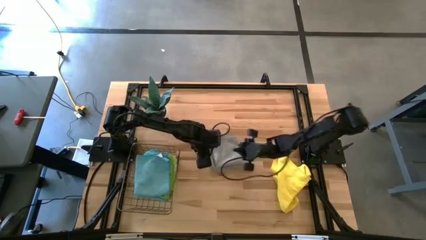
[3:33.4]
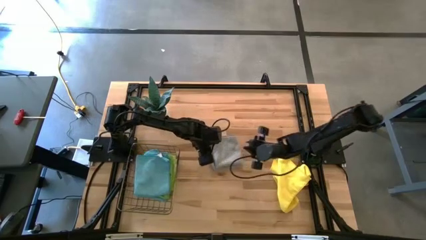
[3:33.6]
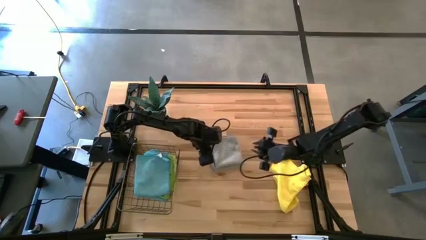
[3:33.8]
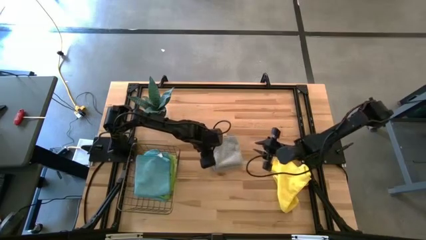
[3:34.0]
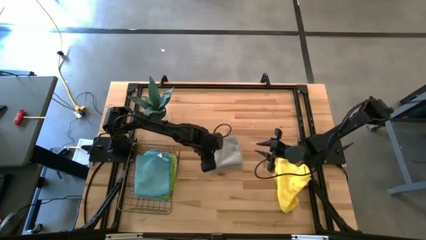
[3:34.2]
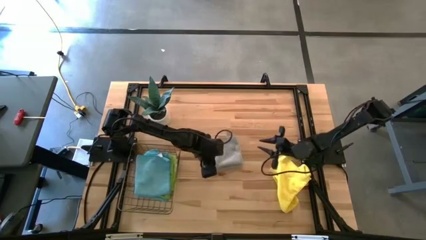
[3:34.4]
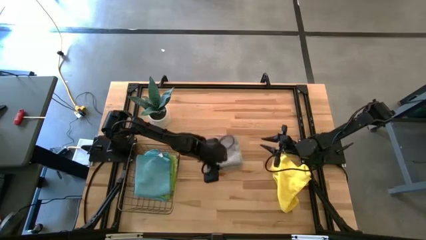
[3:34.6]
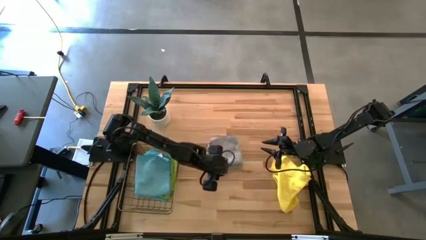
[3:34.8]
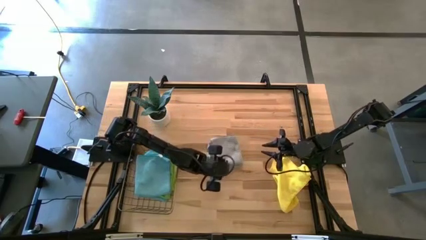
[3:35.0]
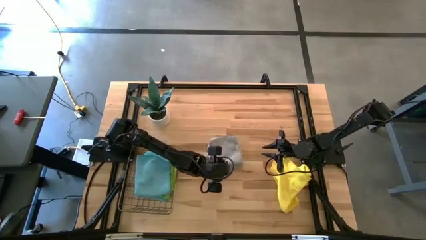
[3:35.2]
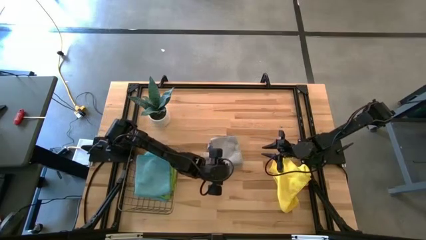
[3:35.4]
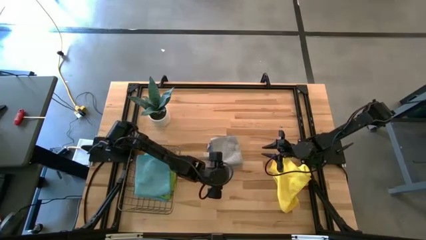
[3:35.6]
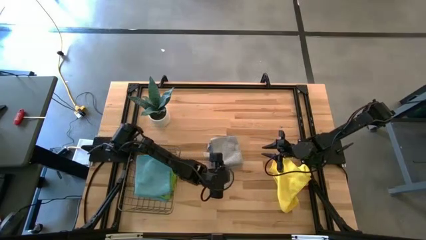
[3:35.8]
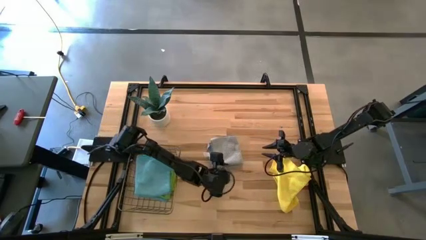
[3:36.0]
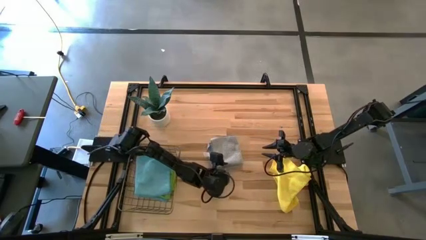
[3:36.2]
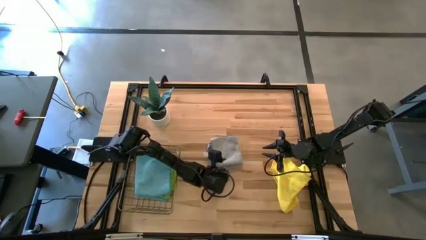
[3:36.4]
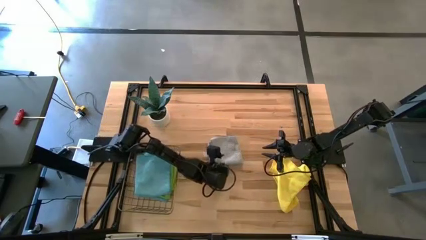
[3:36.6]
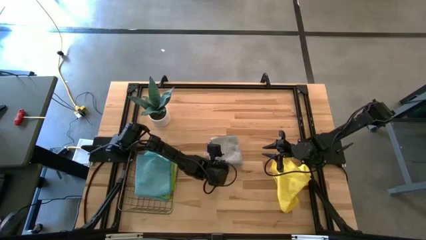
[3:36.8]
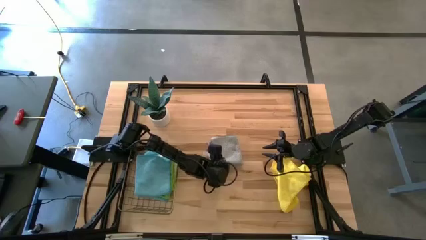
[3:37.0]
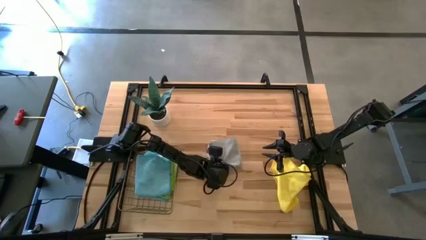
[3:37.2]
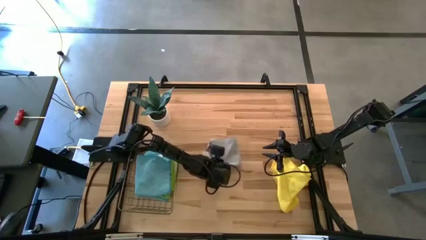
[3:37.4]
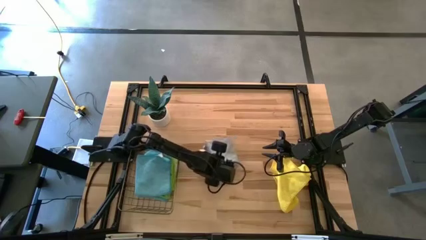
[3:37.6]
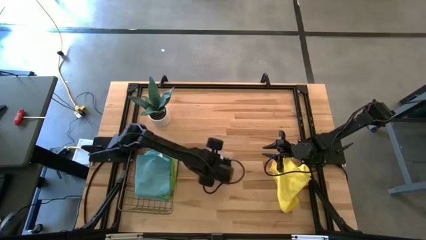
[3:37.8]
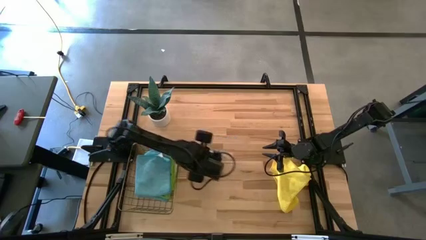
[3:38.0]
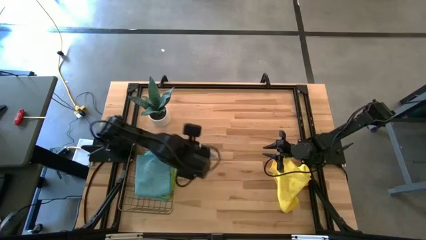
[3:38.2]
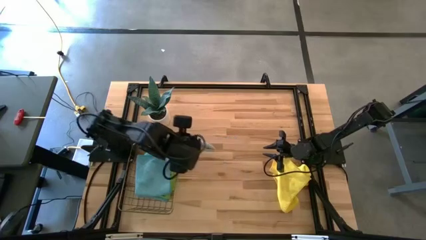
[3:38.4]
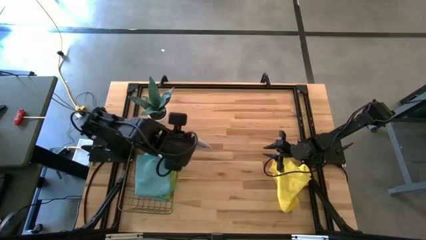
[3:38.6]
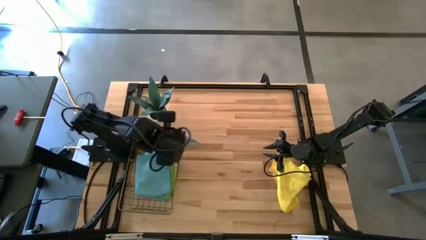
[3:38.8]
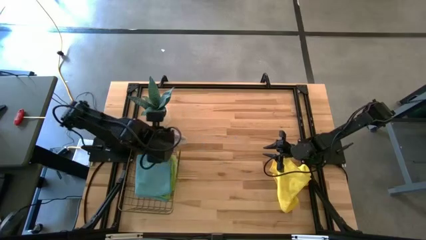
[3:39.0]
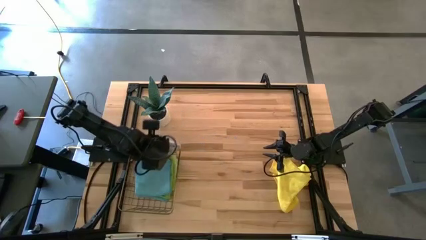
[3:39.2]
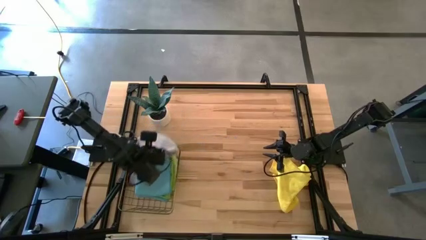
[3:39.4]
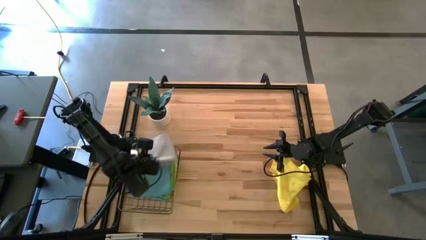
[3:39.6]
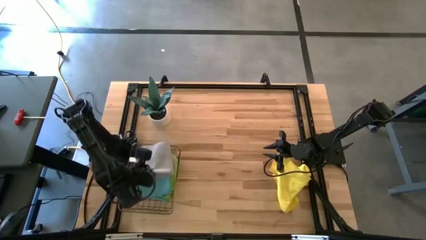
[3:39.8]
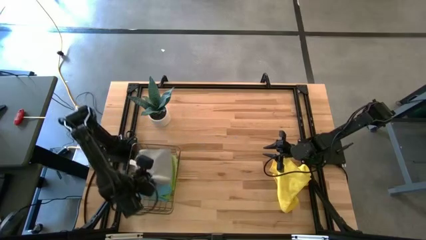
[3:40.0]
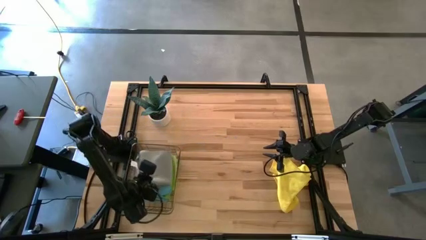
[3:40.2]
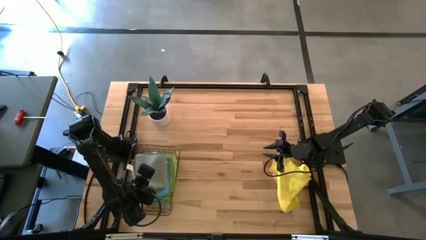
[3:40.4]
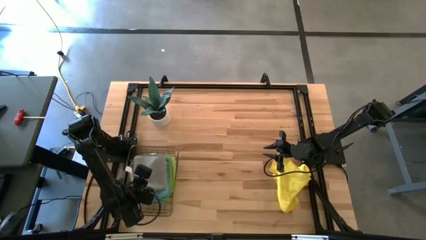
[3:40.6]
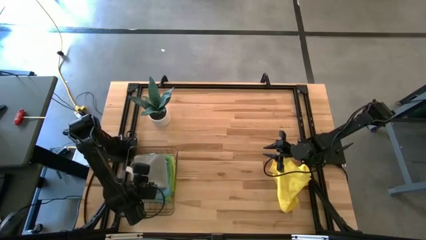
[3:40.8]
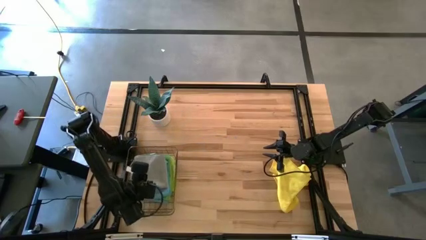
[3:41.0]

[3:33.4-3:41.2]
Task: Fold microfiber towels
Put the gray microfiber towel into the wire basket

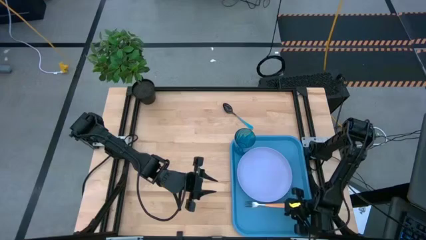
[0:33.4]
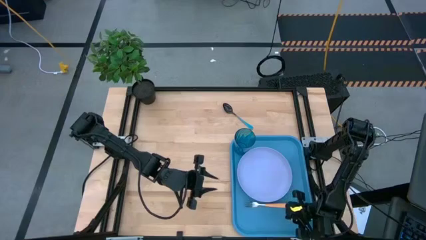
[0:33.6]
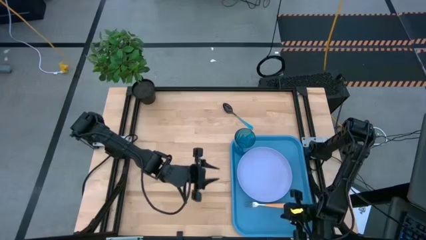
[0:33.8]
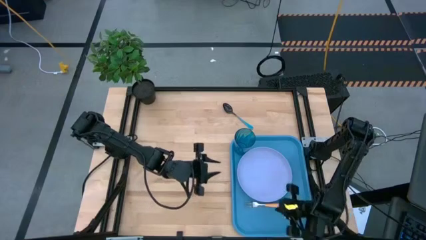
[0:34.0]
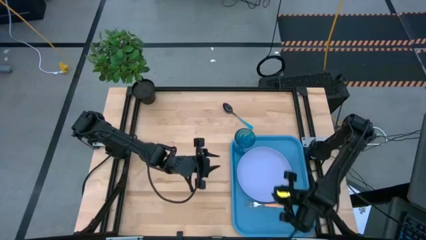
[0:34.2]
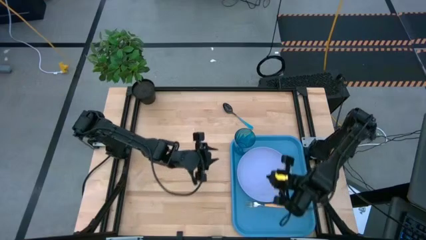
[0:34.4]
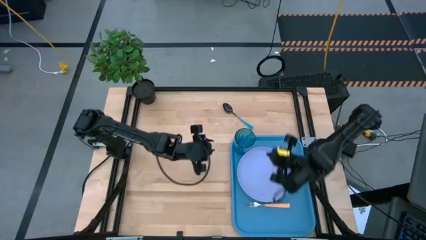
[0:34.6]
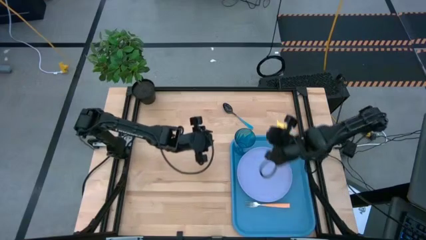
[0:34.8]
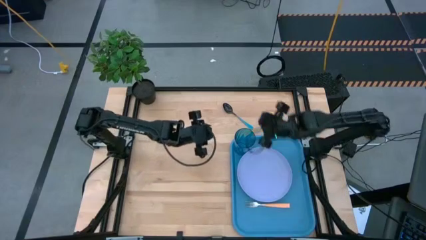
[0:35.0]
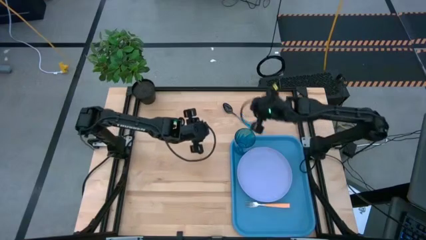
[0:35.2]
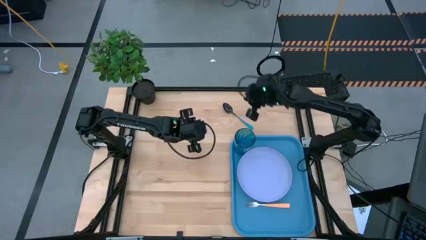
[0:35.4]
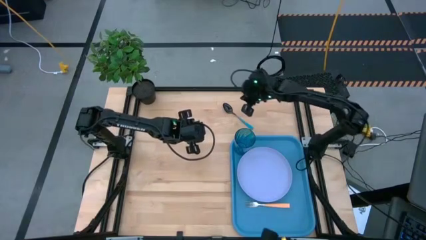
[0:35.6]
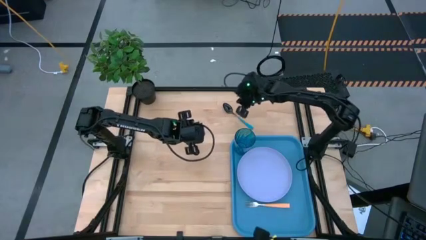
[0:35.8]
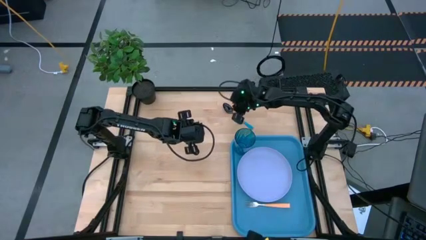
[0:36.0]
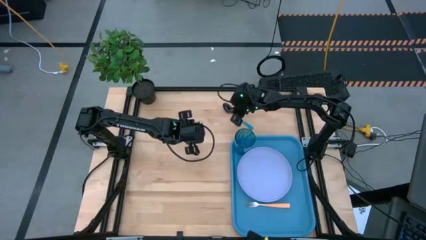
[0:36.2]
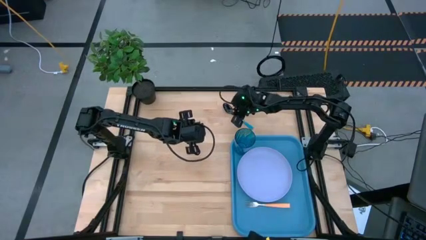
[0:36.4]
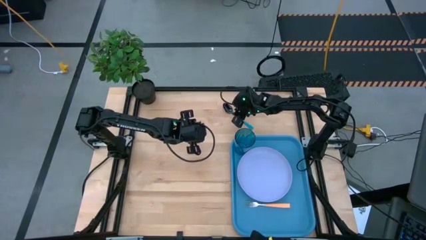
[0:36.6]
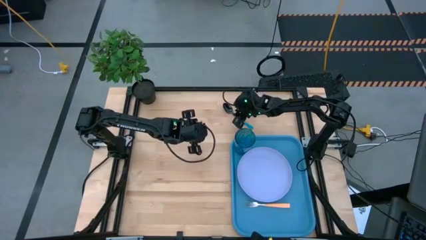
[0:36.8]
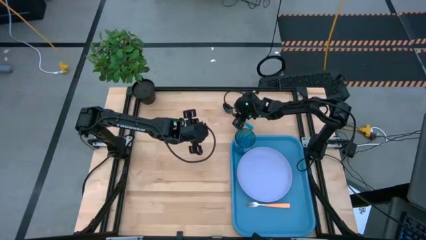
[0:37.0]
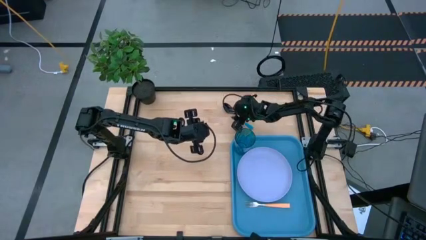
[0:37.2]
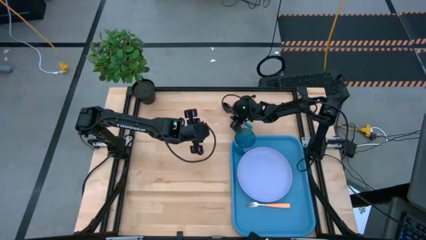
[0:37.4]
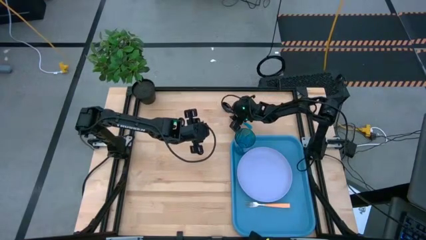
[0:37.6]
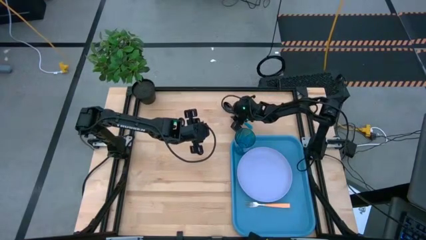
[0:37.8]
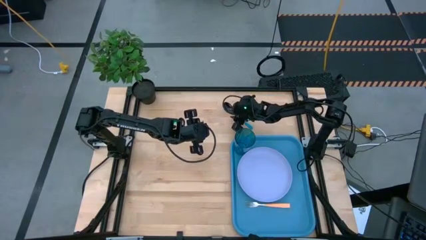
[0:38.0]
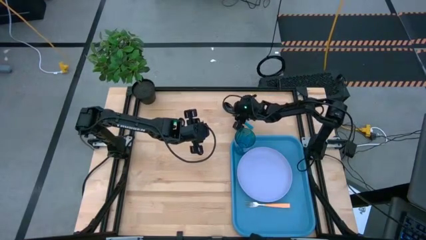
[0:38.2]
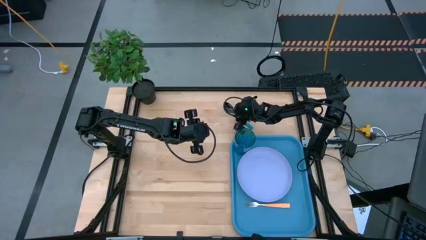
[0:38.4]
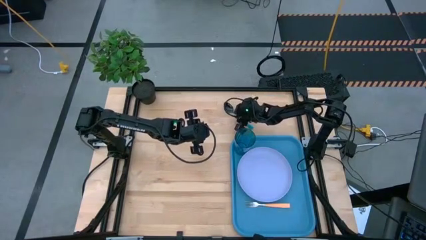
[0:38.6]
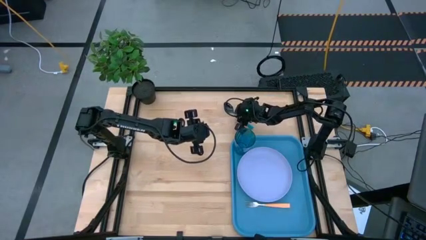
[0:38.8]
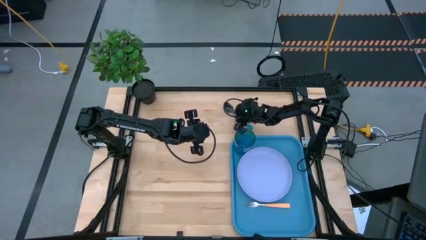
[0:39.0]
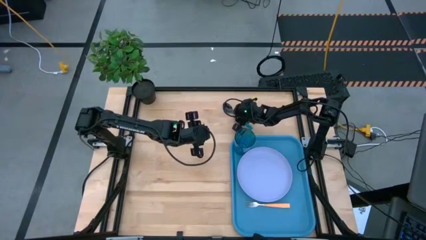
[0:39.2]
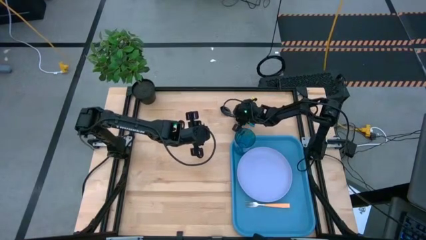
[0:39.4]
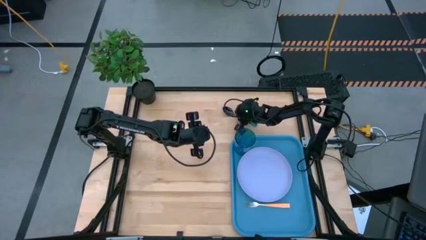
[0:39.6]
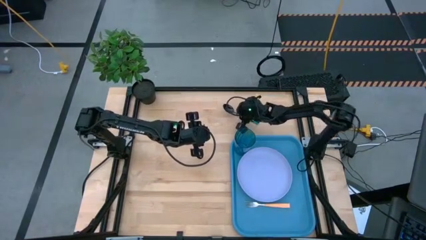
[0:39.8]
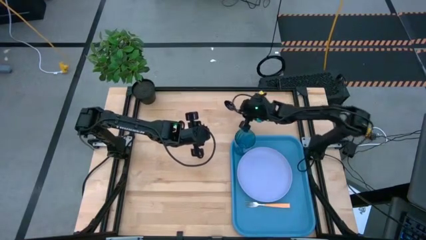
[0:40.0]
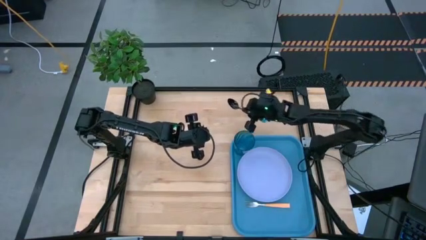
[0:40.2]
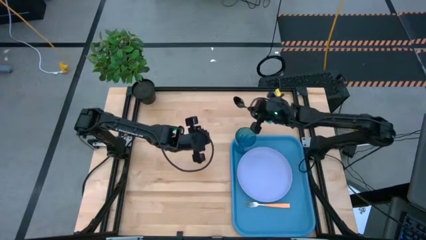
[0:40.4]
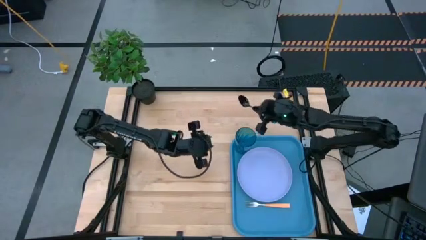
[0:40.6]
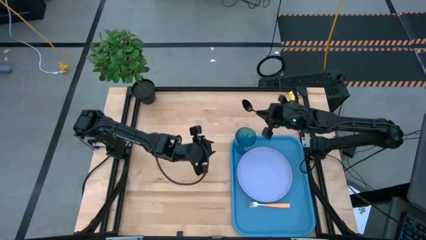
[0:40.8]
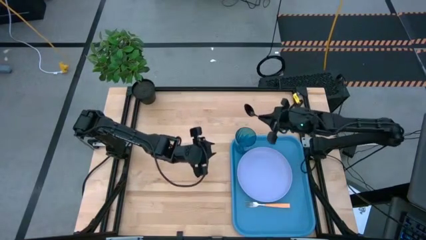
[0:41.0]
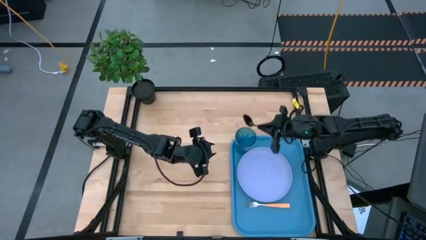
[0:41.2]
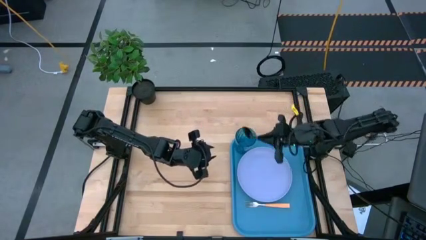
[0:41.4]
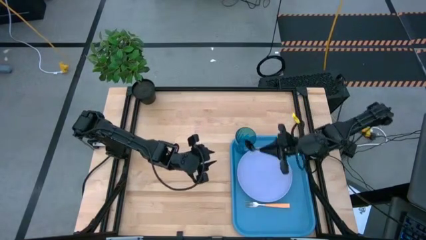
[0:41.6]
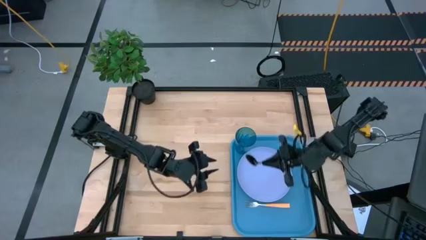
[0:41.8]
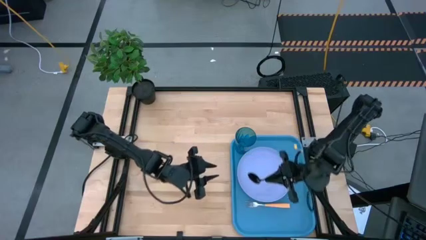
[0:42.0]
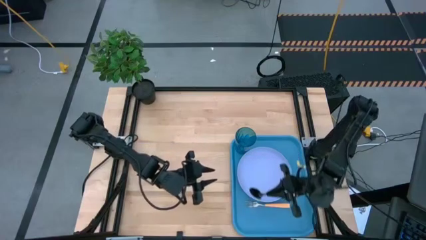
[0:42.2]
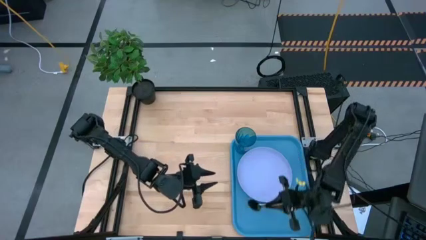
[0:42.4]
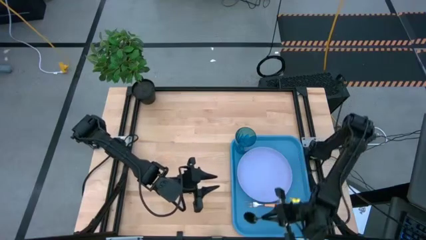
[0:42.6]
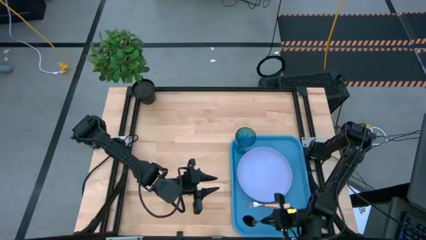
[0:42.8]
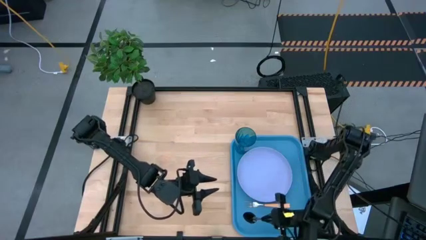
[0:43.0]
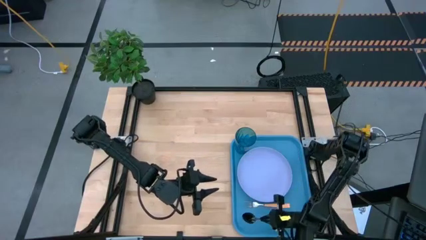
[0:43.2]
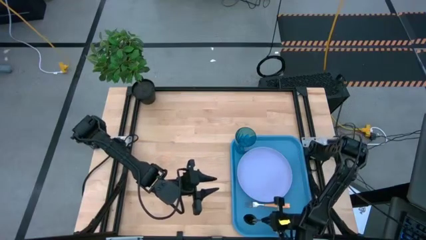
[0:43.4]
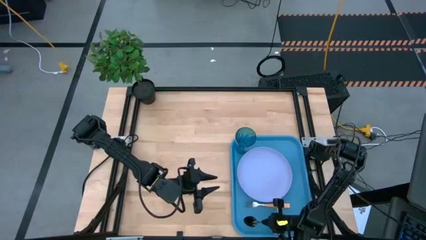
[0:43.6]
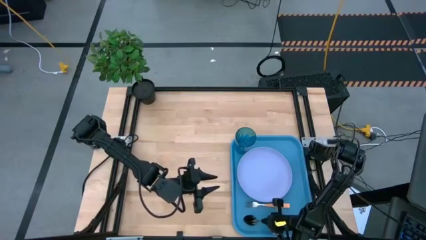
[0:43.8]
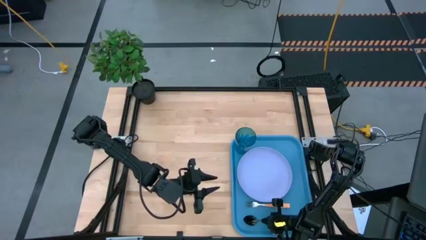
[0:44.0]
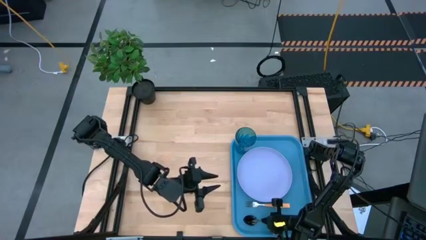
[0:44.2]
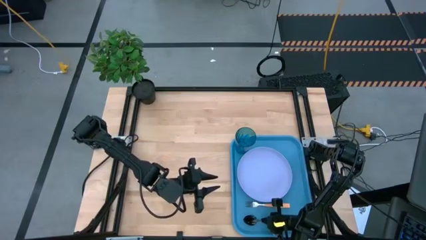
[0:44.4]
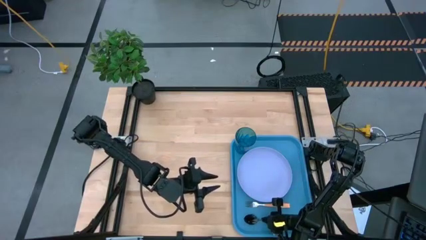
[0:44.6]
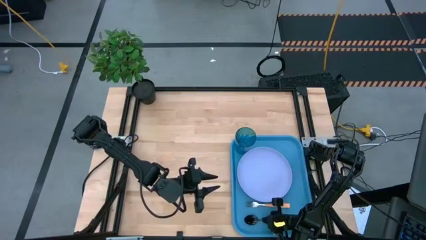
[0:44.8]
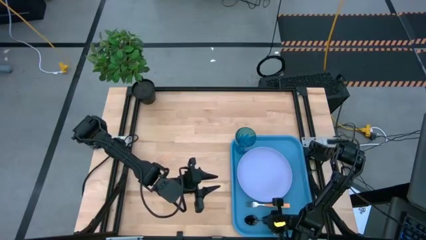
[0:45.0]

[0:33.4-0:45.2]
Task: Pick and place plate/cup/fork/spoon on tray
Put the blue spoon on the blue tray at the left side of the orange fork
